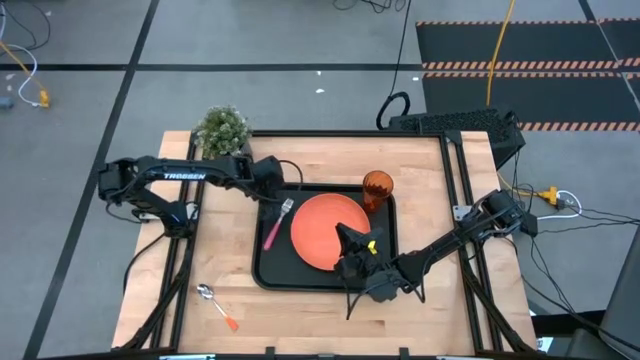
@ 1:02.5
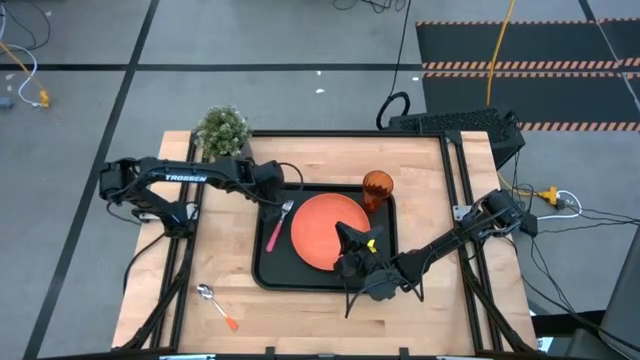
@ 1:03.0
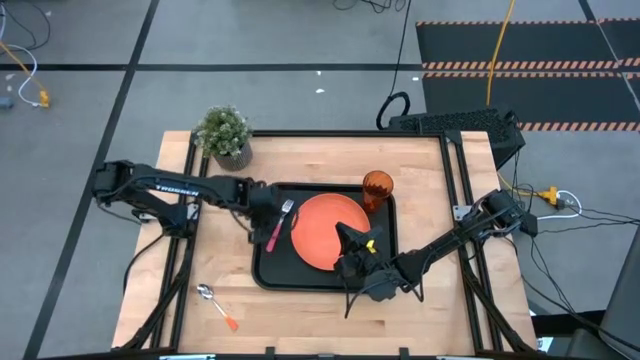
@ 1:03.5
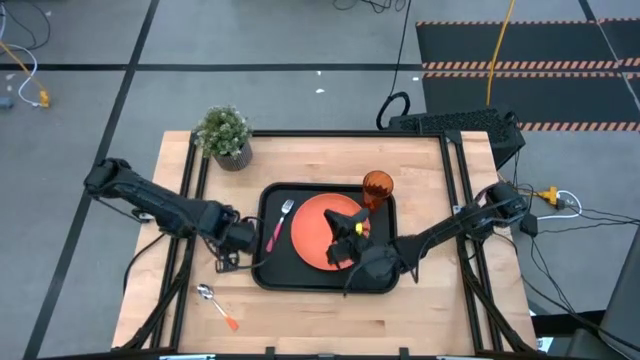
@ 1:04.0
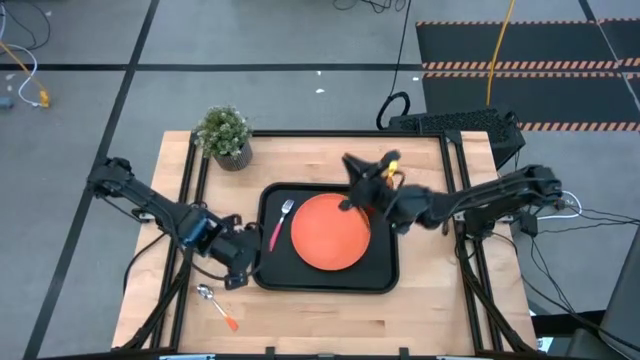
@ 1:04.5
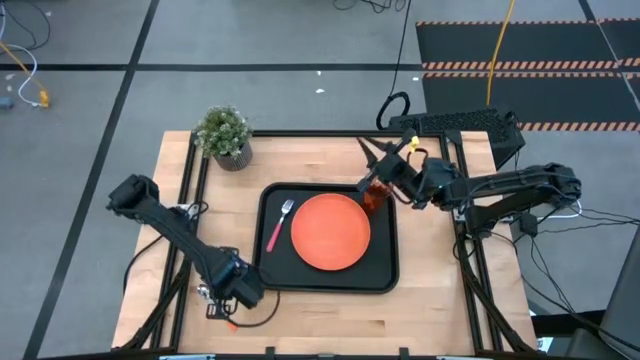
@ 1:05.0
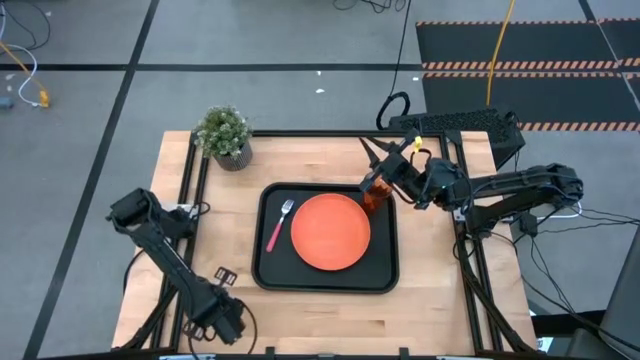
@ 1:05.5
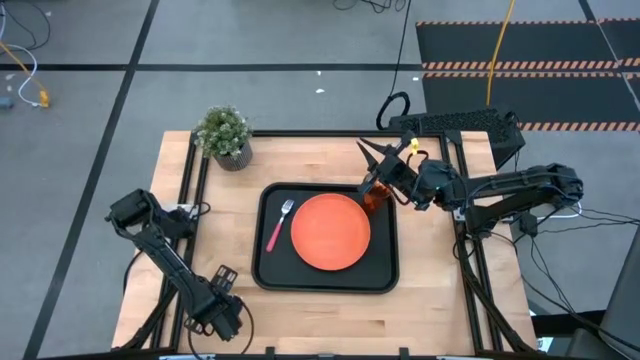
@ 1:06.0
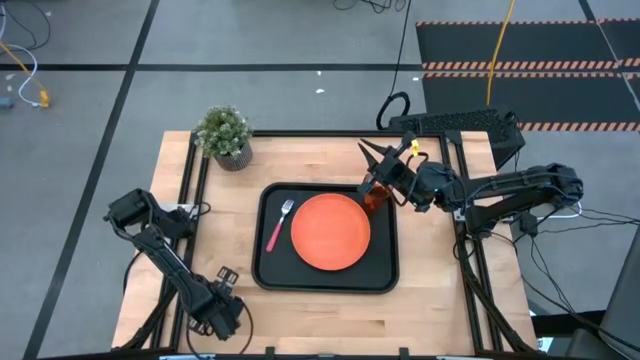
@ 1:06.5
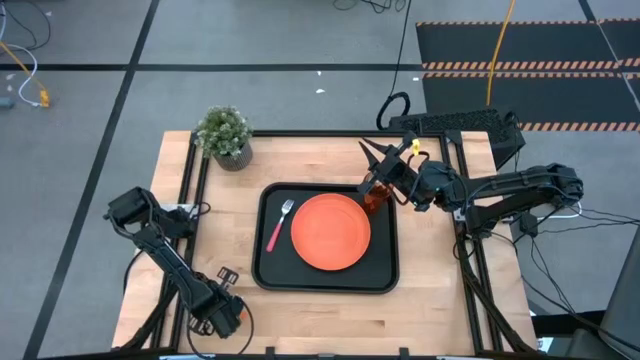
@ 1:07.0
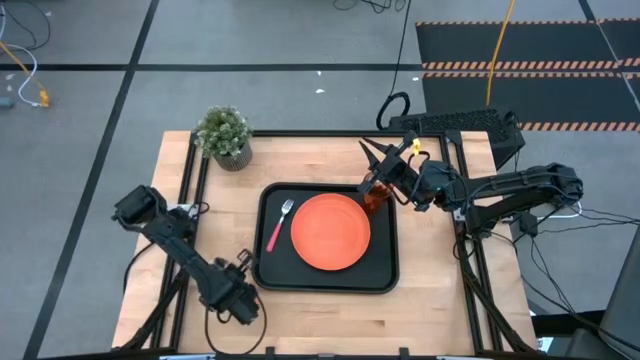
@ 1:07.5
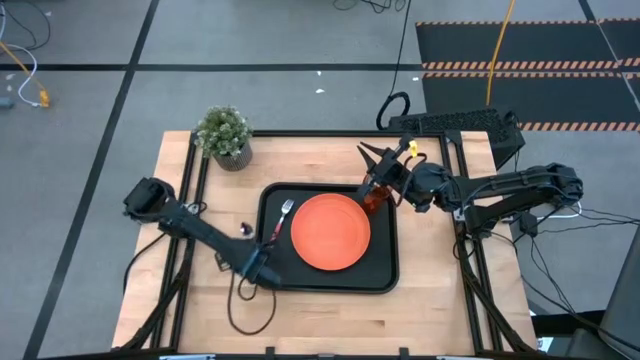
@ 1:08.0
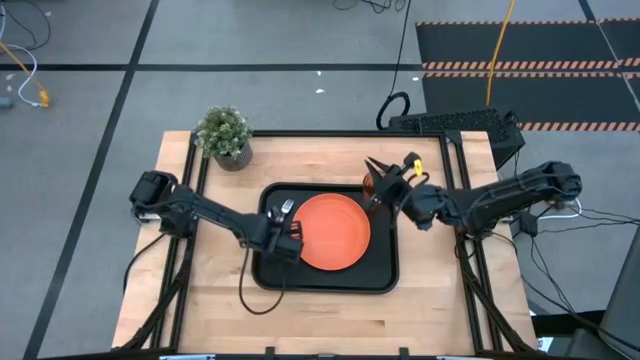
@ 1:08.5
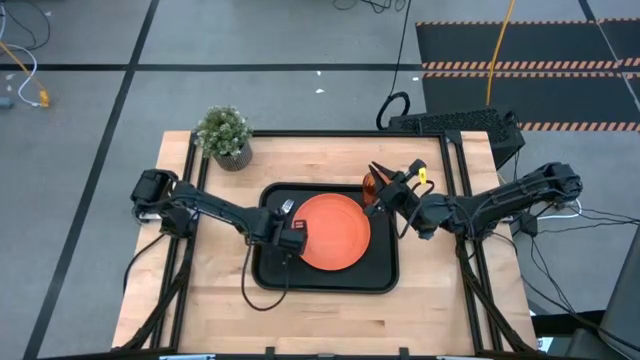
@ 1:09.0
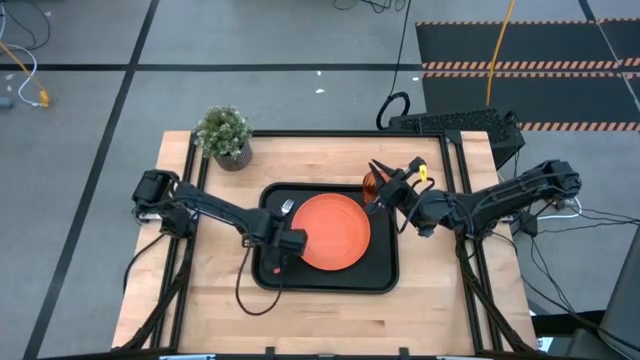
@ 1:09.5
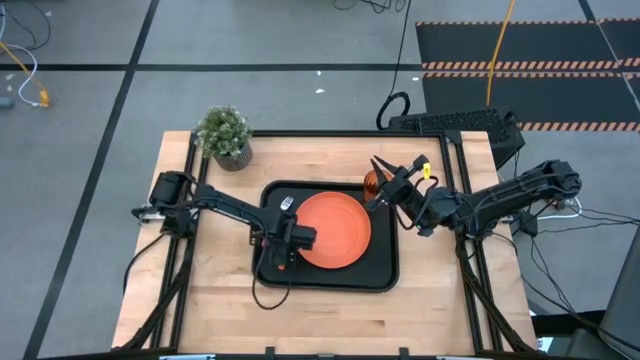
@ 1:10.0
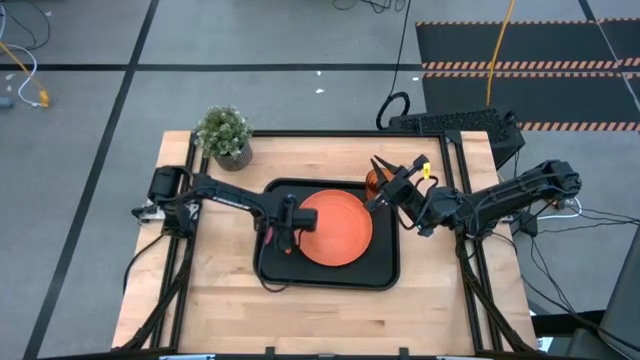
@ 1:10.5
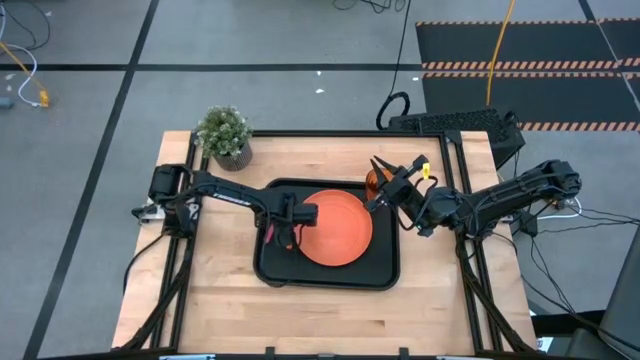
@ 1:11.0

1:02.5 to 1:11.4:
Task: Pick and place plate/cup/fork/spoon on tray
Put the orange spoon on the black tray in between the orange plate and pink fork

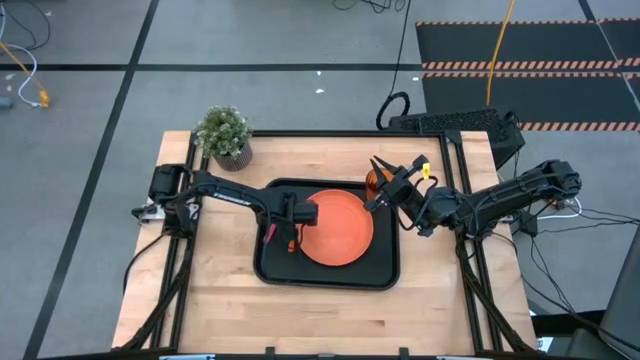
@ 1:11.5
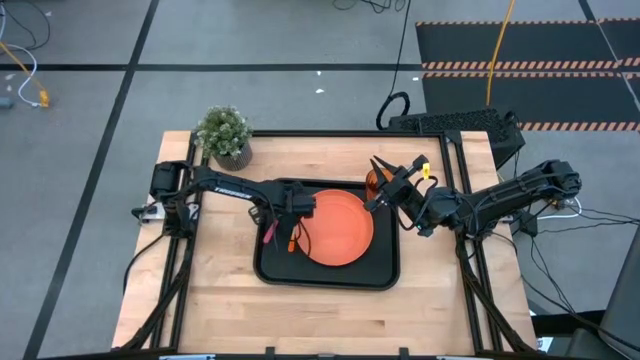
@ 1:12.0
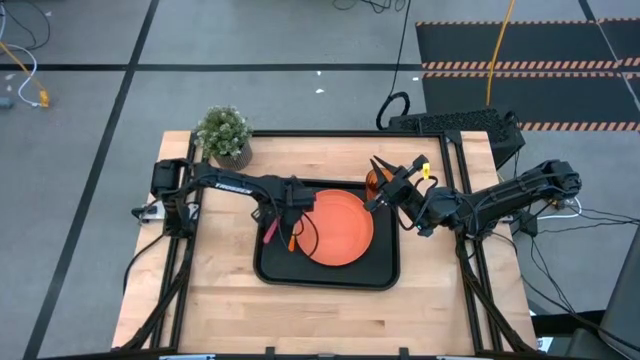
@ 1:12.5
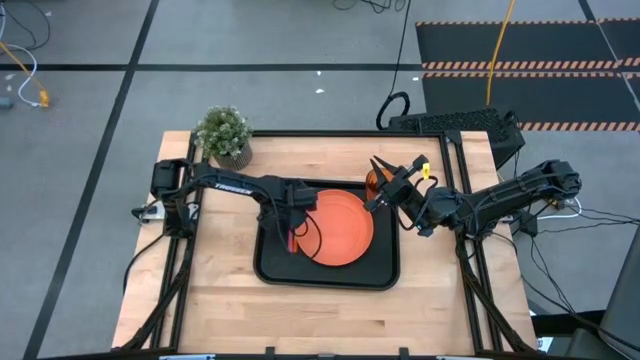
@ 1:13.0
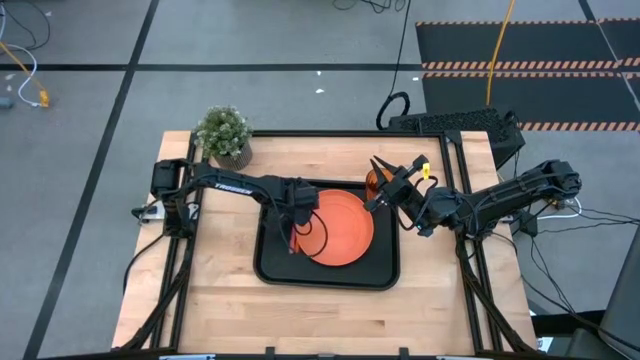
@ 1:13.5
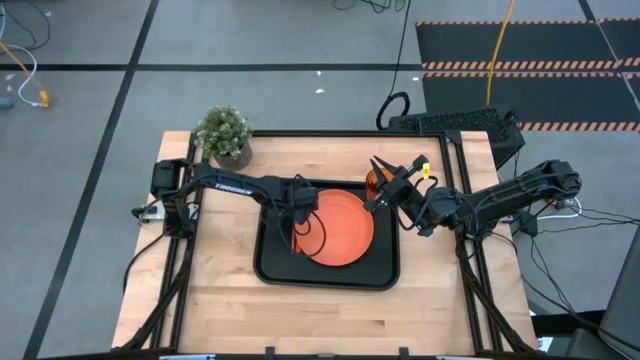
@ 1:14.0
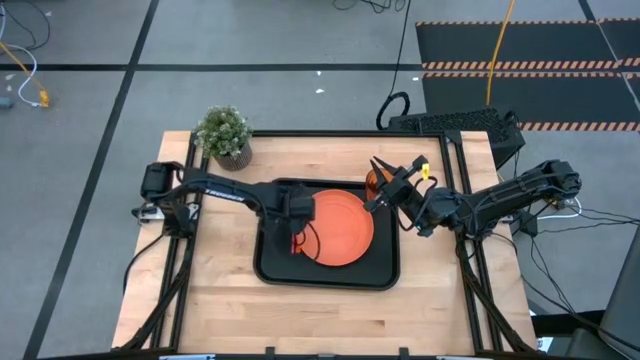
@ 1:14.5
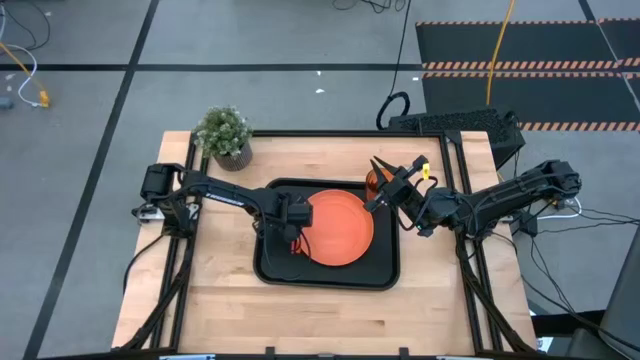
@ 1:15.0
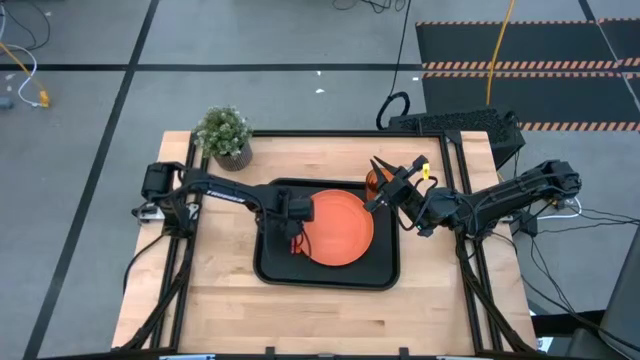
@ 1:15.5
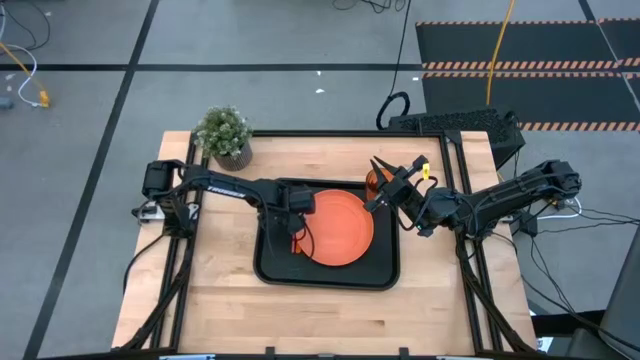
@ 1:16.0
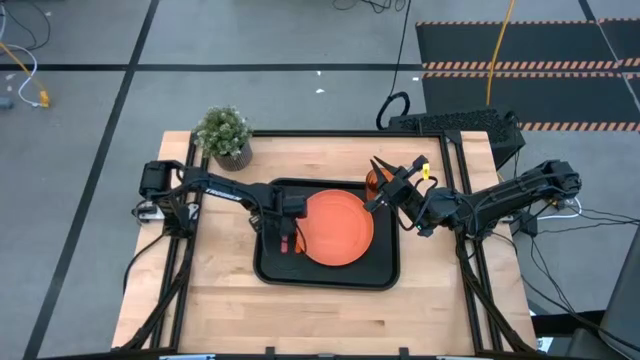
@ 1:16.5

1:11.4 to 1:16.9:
Adjust the pink fork on the black tray

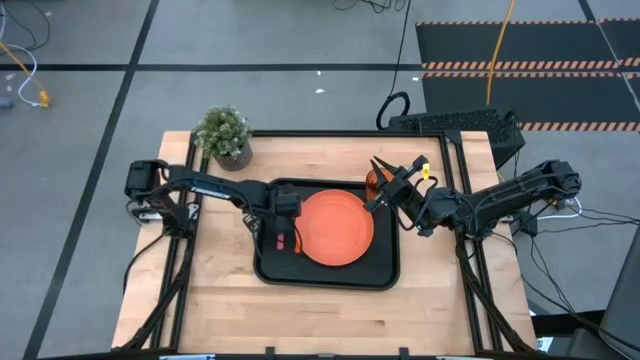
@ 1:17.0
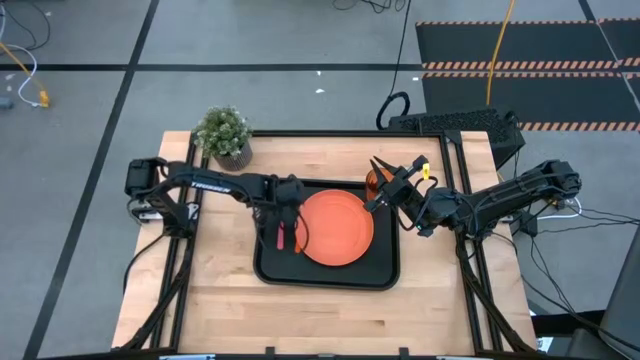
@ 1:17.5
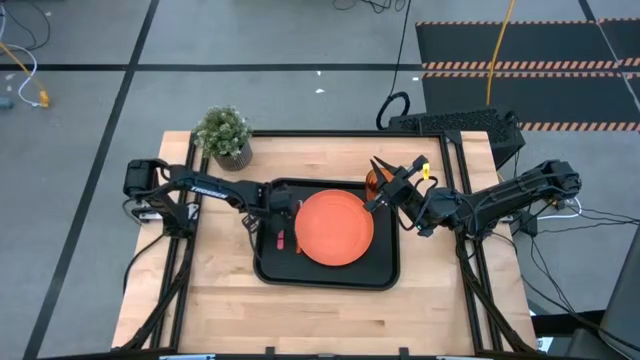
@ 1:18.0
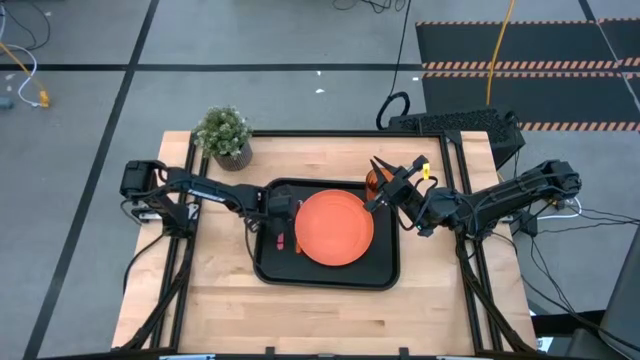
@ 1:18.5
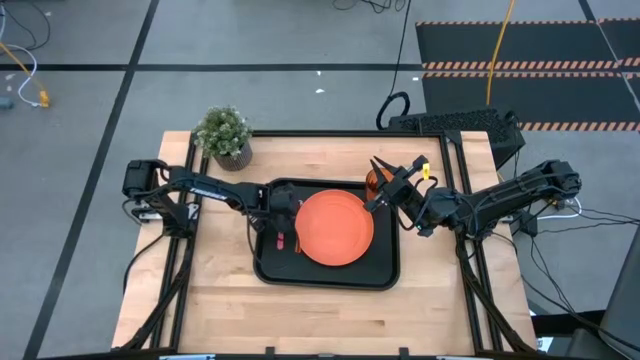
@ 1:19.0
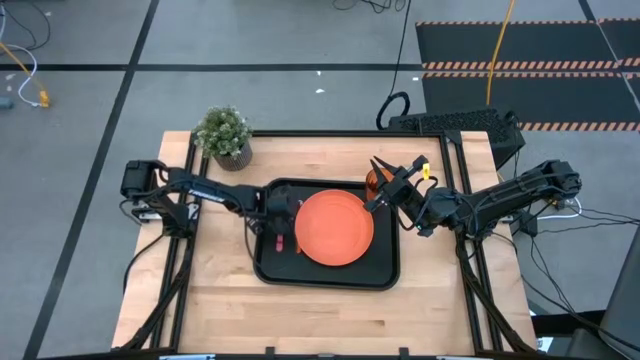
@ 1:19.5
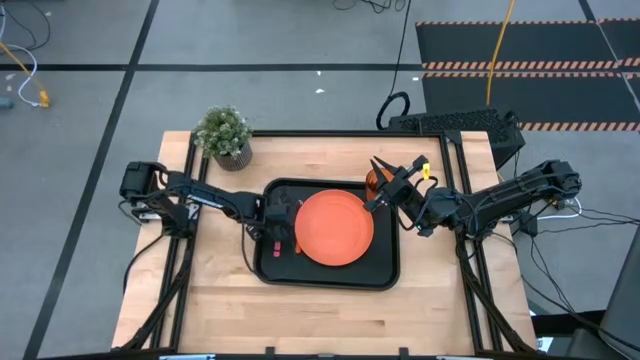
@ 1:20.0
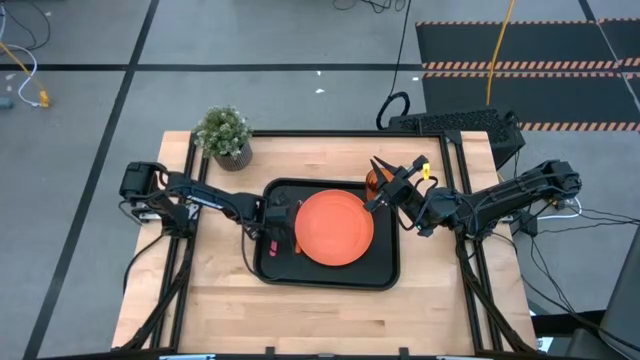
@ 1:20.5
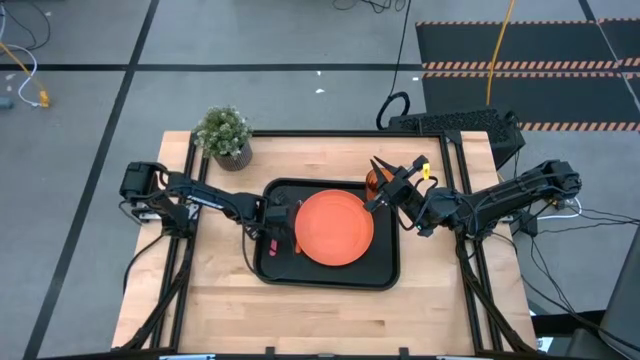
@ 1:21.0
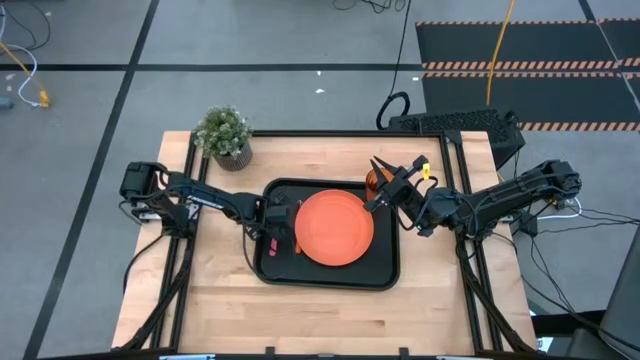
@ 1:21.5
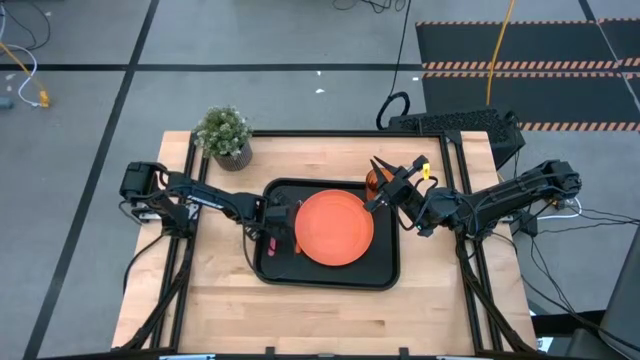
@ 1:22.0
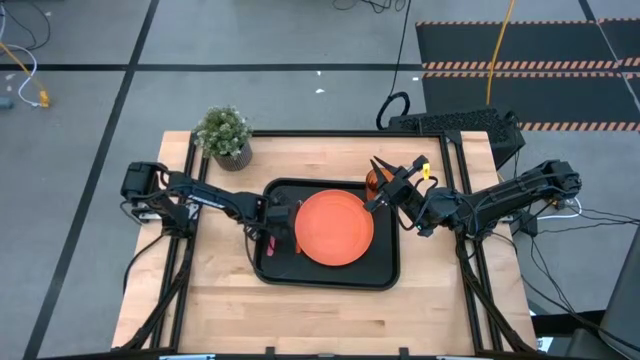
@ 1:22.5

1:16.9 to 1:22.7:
Adjust the pink fork on the black tray

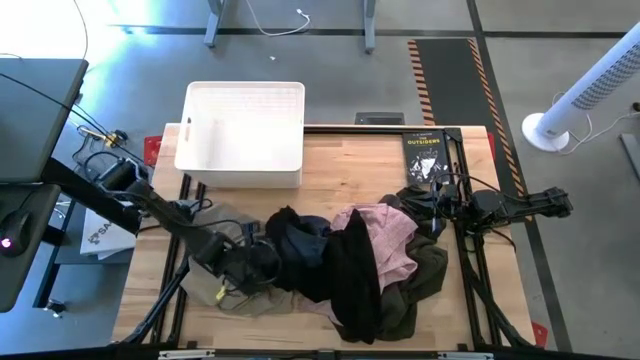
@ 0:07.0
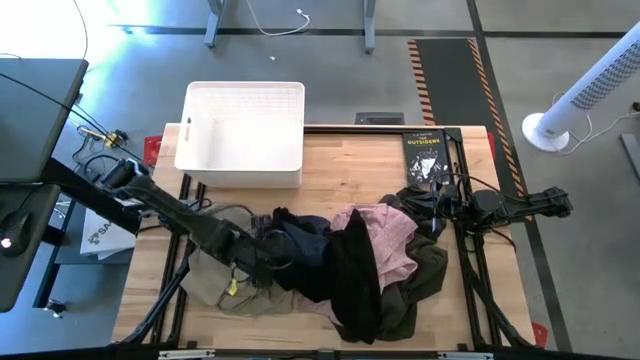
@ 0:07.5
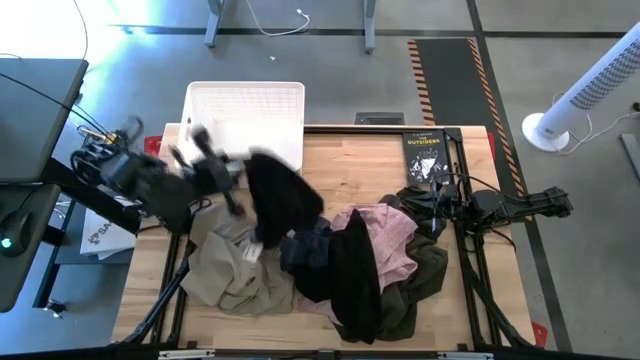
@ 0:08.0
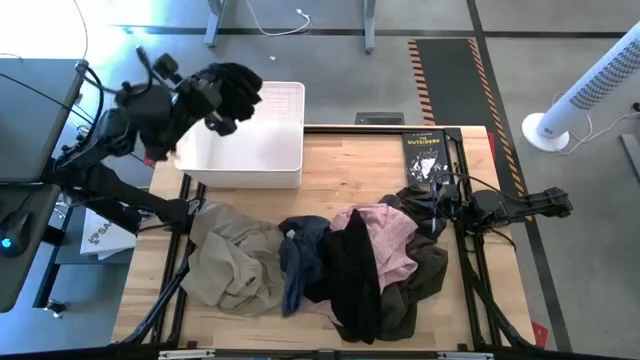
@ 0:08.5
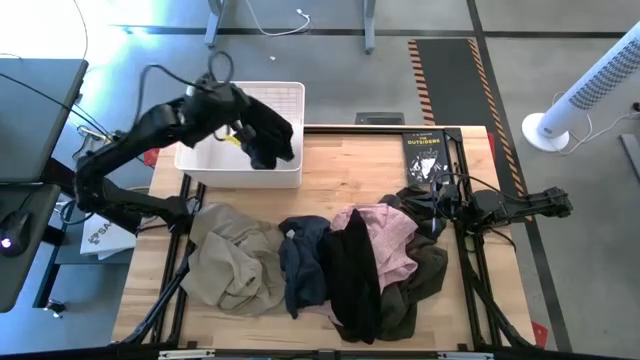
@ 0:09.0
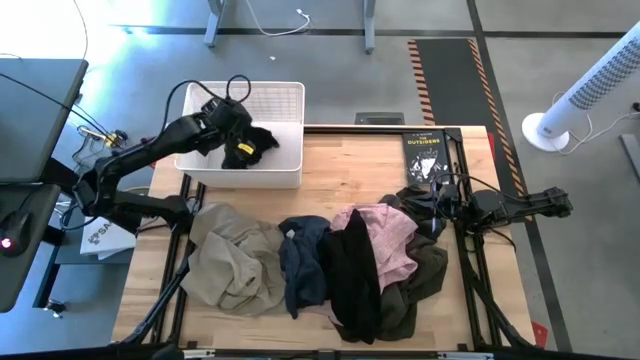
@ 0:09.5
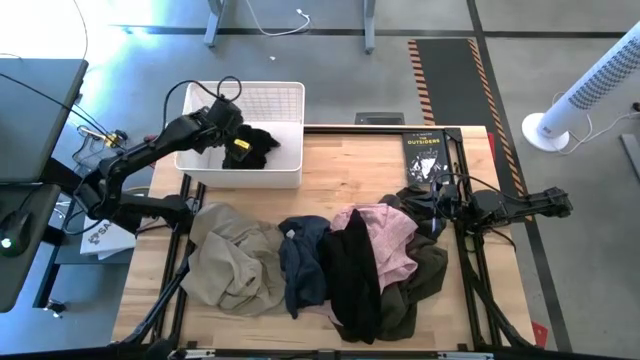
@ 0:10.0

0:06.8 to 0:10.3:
Task: Sort clothes
Put the black short into the laundry bin
